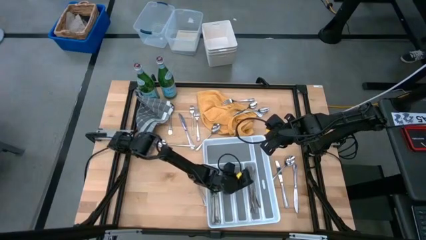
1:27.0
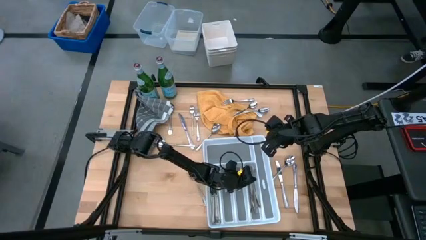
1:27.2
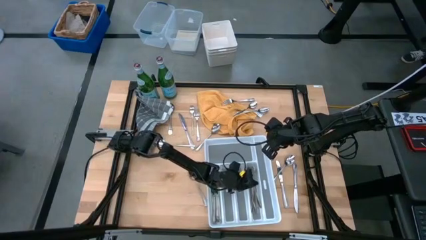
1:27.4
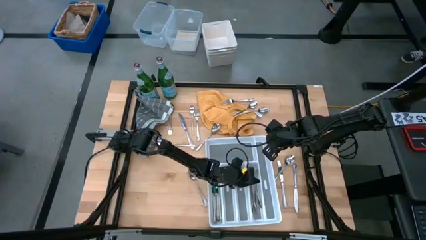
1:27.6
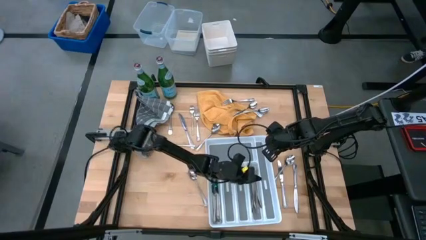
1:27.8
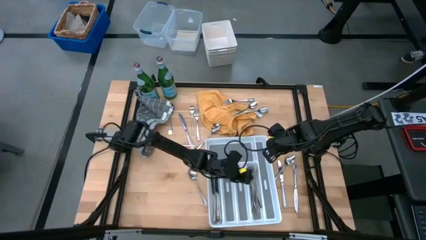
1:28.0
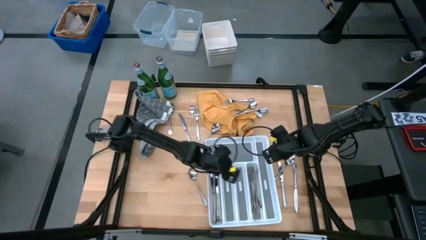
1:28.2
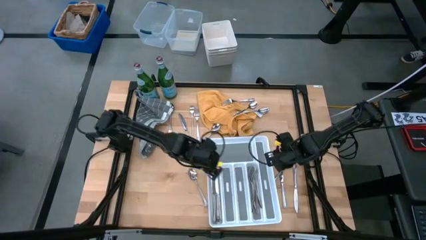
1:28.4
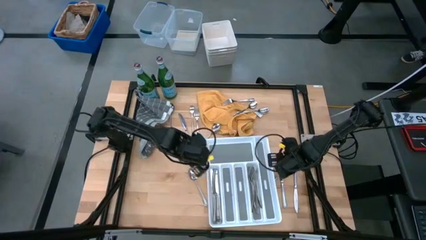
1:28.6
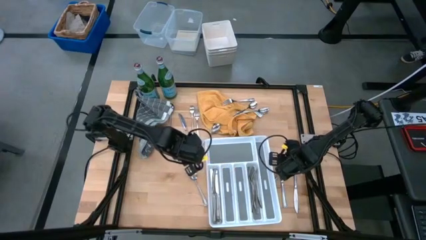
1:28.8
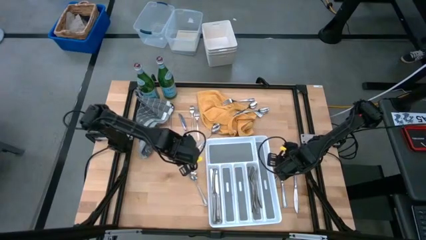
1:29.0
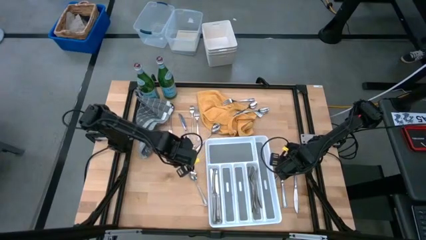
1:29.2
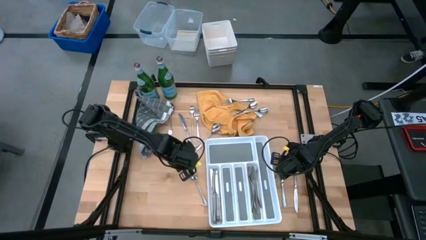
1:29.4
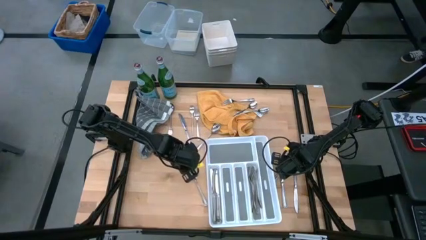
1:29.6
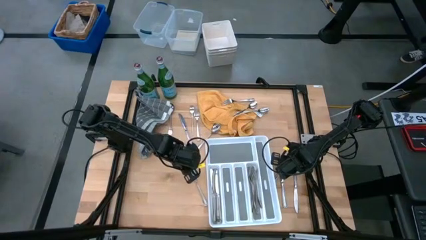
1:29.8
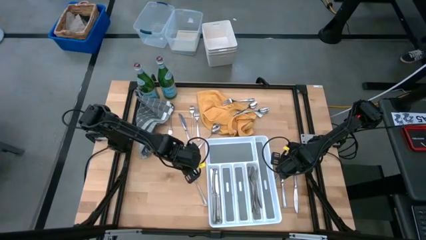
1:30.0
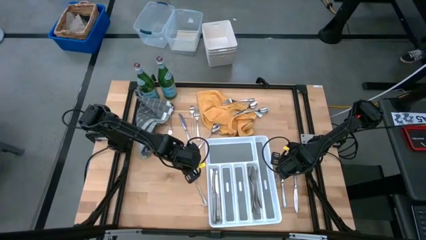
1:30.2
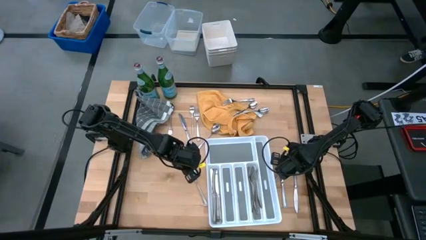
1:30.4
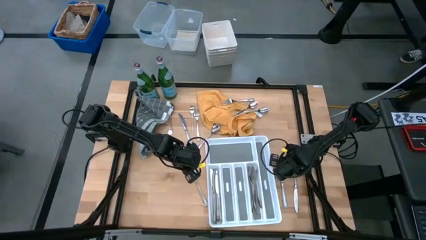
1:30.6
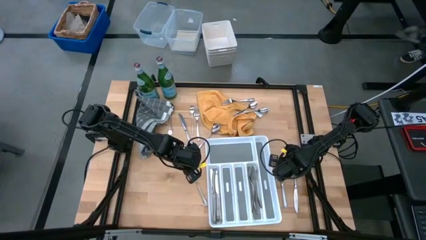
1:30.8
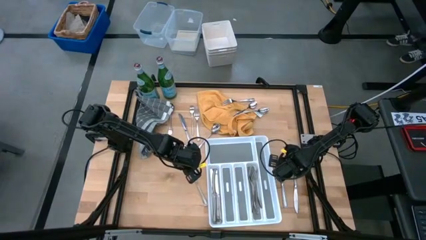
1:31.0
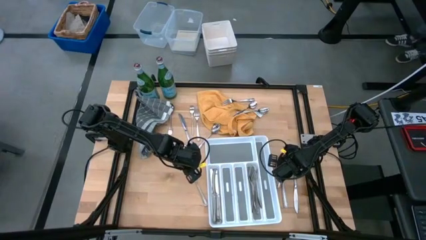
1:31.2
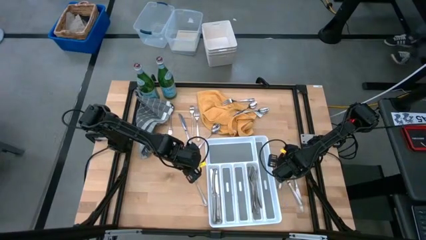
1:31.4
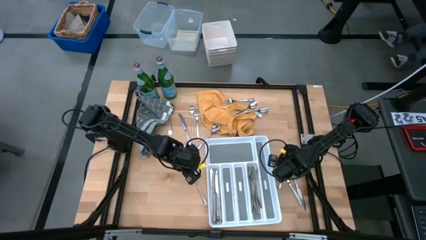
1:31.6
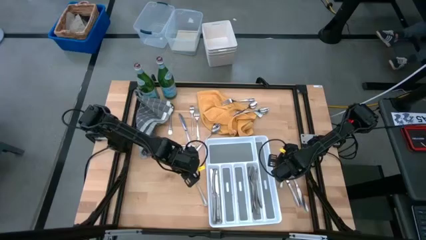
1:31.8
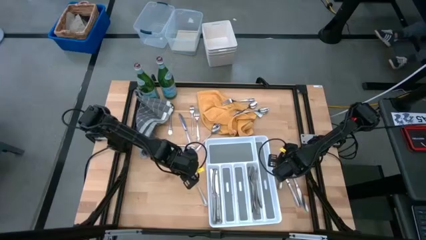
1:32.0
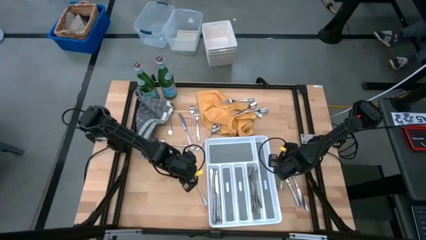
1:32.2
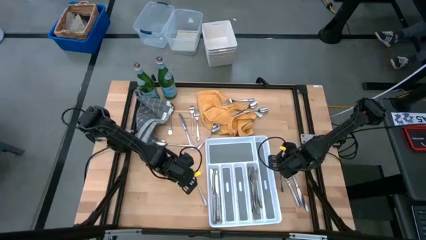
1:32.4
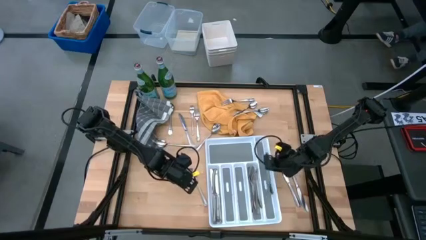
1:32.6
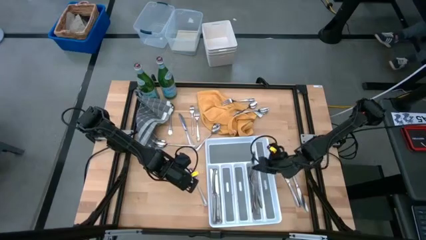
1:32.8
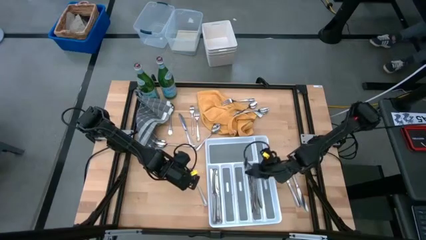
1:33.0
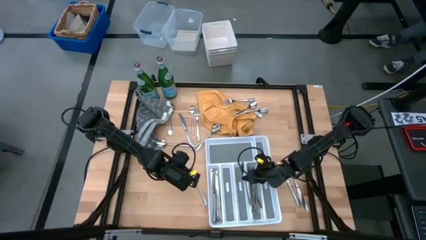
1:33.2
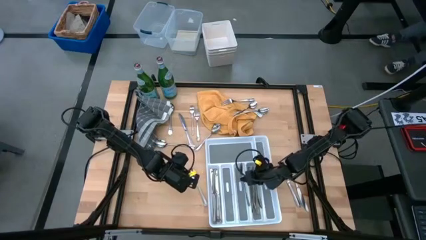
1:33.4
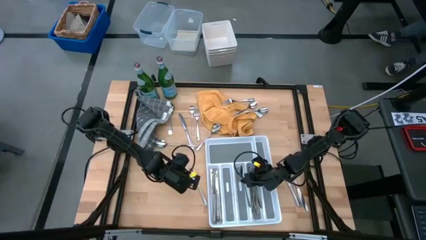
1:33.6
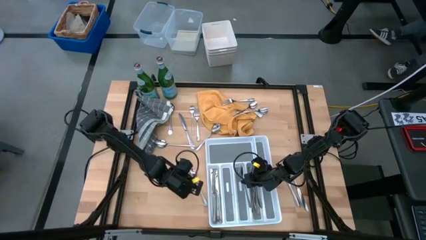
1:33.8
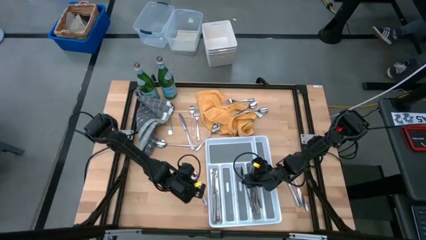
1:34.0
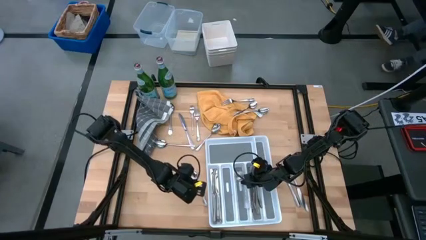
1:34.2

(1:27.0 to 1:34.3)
Task: Sort silverware
Put the spoon into the silverware tray

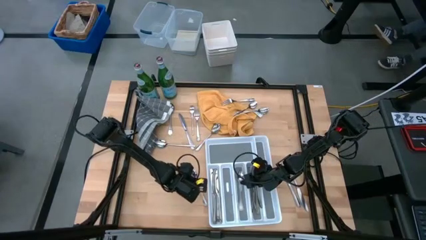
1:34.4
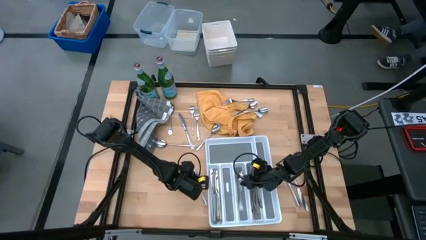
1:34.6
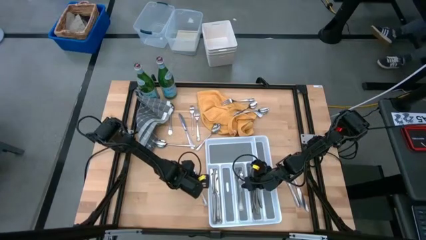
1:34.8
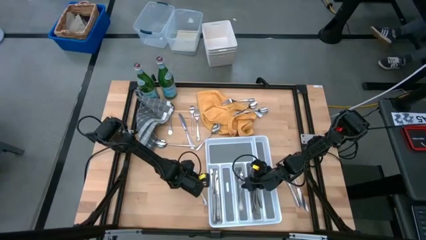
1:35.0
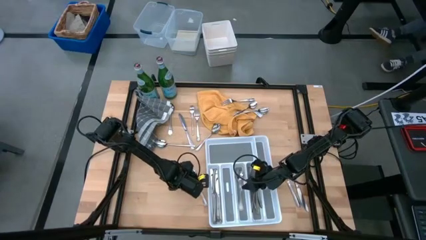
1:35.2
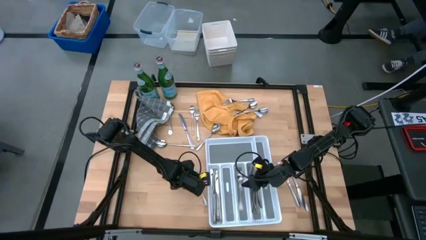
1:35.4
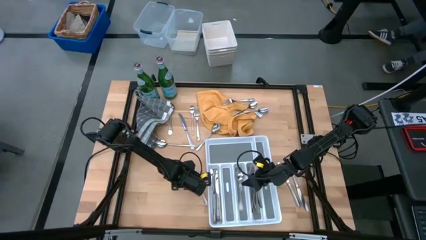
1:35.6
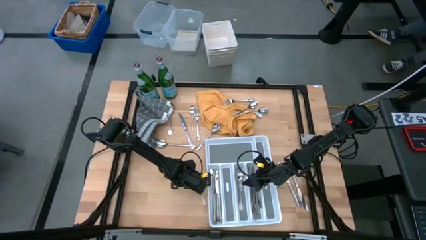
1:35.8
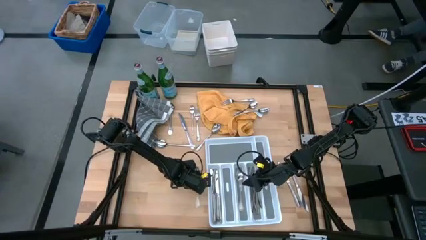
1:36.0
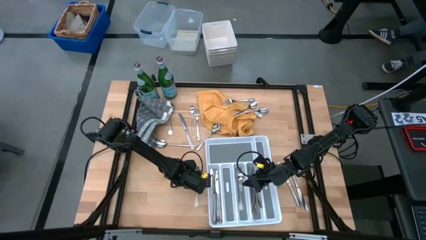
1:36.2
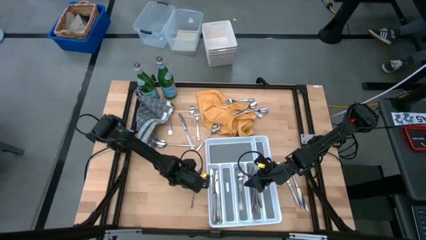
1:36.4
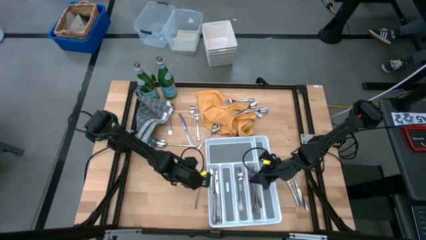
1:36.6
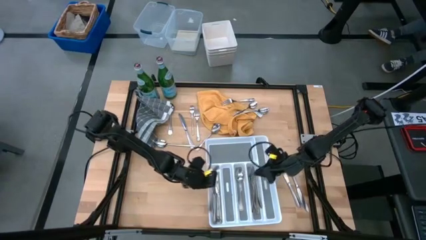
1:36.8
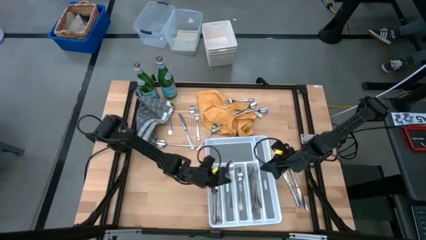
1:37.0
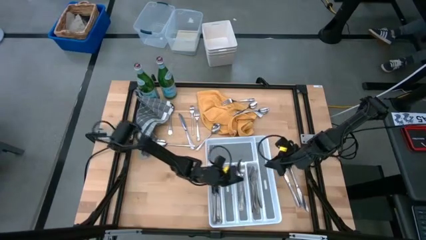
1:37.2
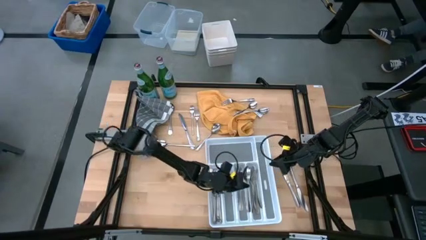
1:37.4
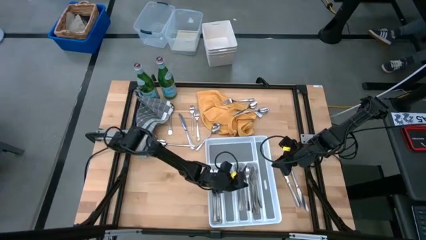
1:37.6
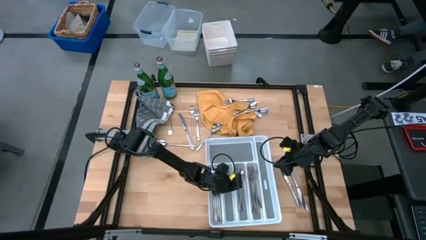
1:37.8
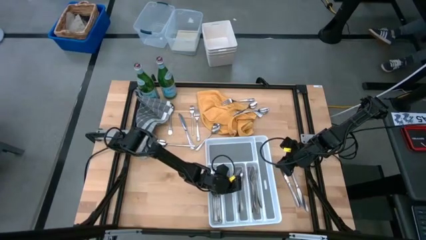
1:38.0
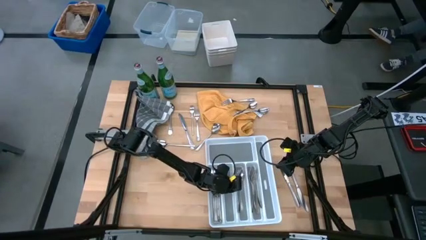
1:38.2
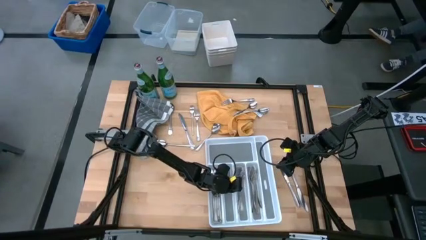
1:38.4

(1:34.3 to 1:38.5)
Put the spoon into the silverware tray

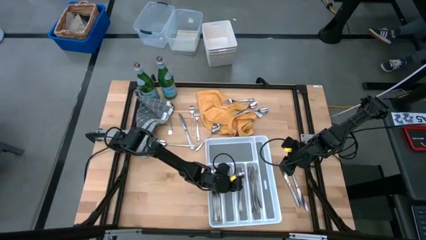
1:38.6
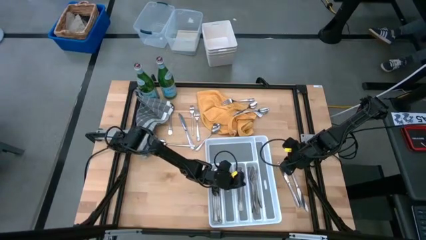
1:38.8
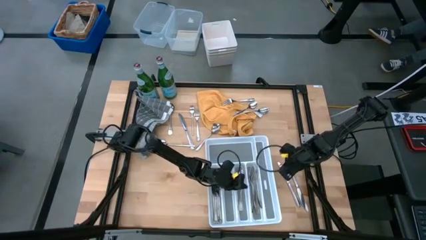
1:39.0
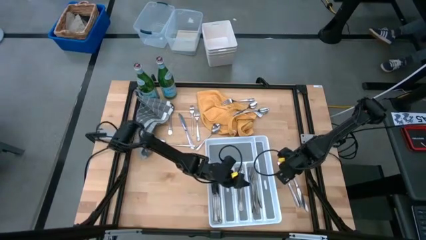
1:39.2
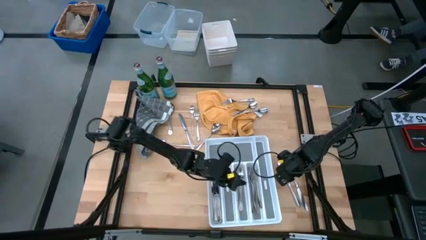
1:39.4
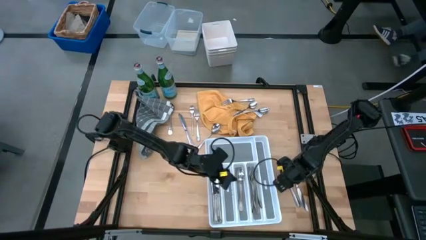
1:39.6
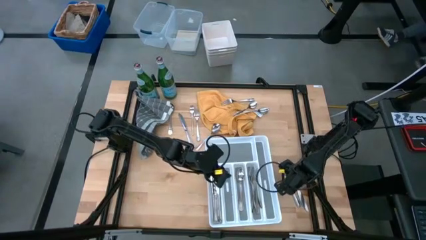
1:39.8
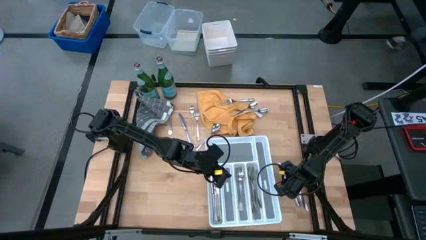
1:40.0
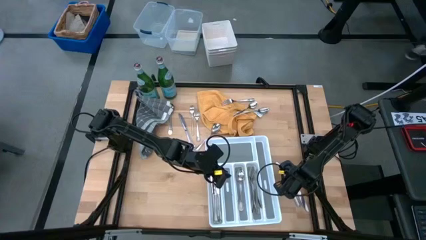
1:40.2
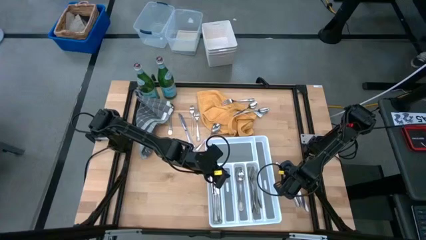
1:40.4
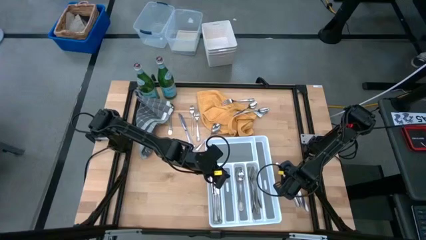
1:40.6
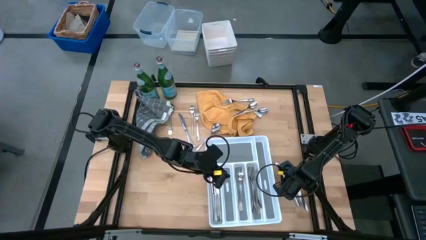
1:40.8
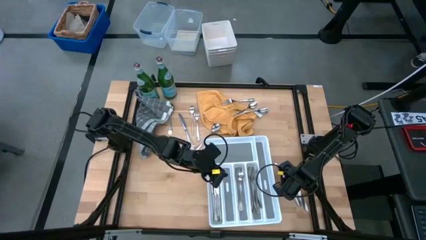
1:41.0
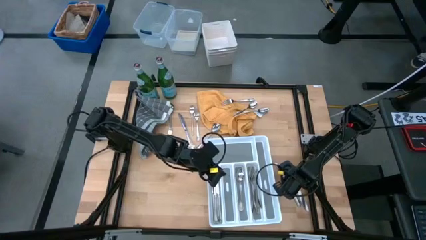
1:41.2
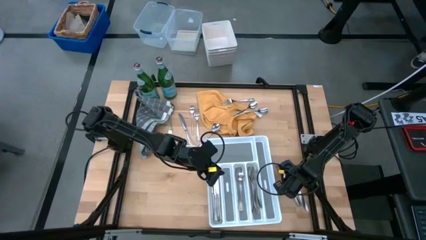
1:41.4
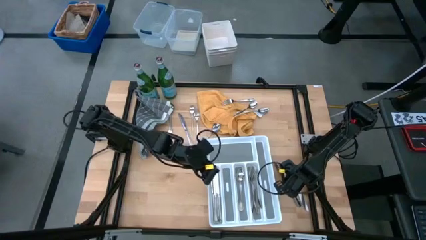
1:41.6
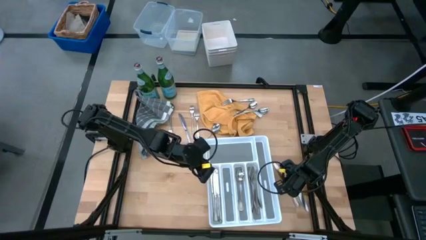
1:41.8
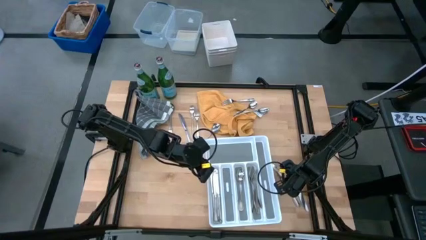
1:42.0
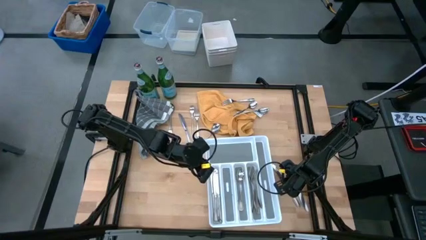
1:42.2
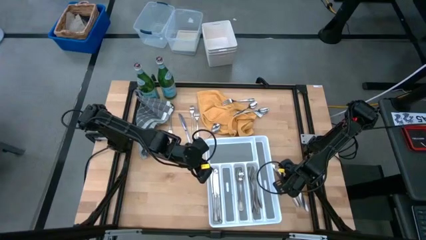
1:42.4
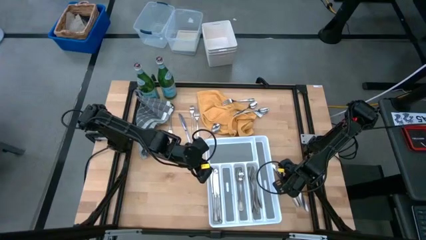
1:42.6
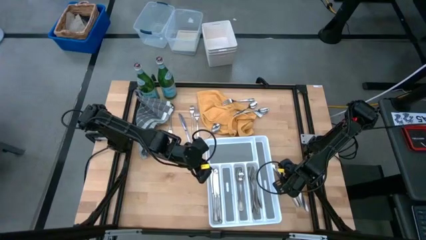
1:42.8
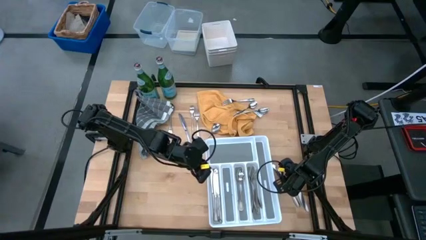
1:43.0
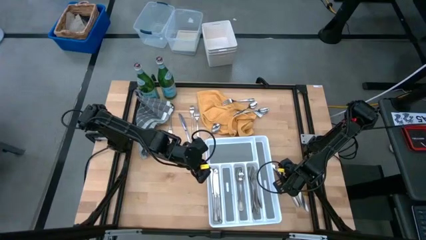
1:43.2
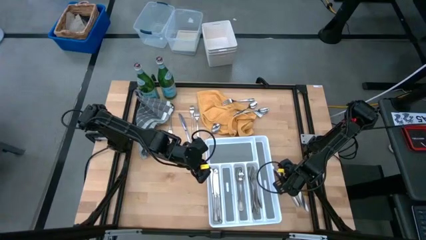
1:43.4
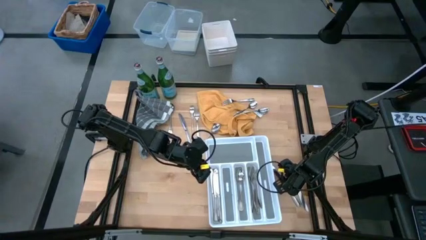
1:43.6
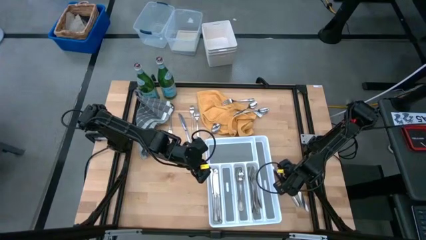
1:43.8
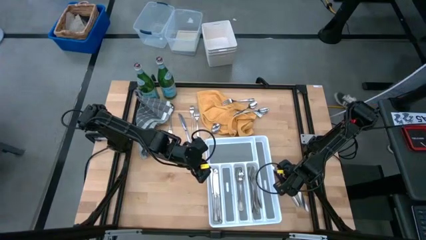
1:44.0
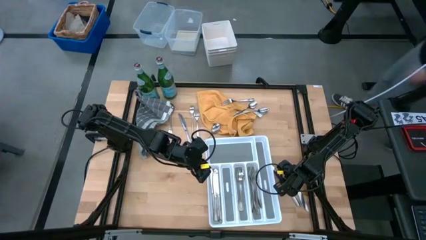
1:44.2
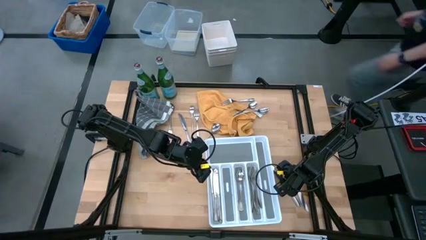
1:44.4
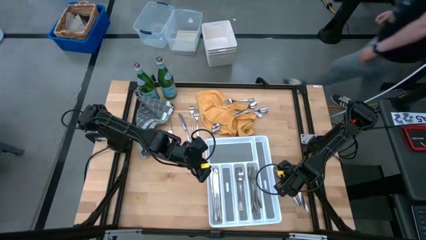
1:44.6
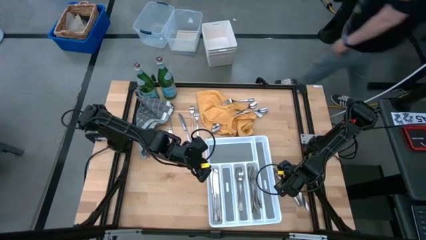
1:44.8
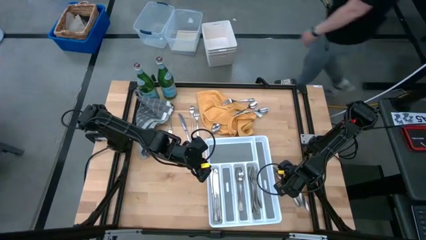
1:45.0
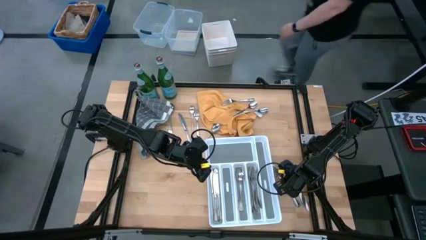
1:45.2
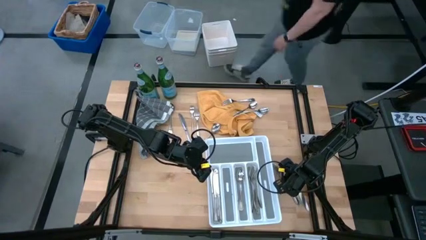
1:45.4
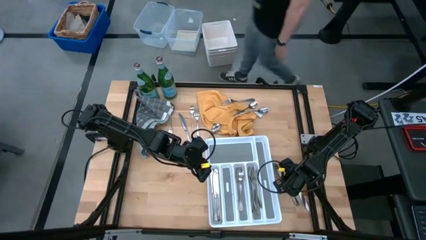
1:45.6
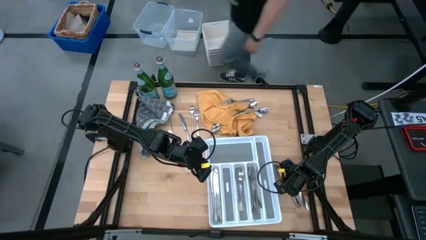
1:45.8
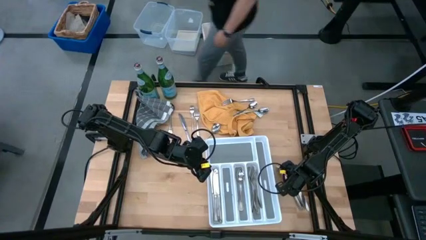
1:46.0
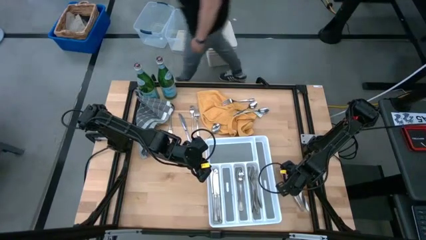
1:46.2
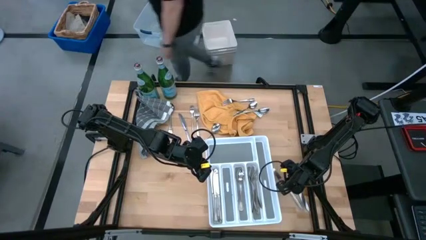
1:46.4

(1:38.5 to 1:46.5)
Put the table knife into the silverware tray
